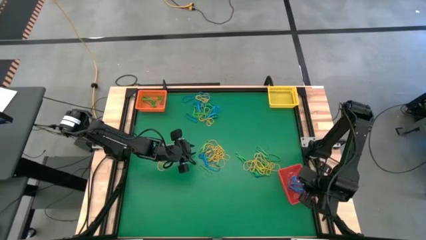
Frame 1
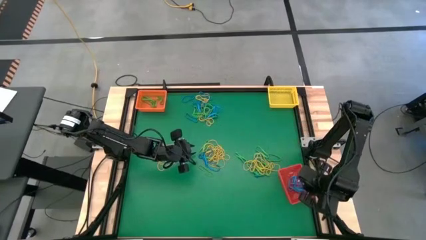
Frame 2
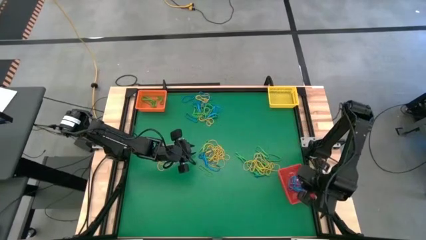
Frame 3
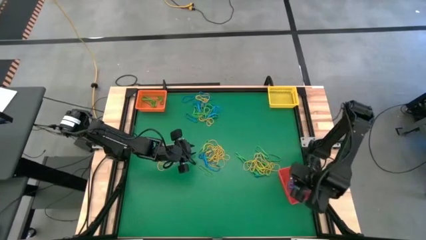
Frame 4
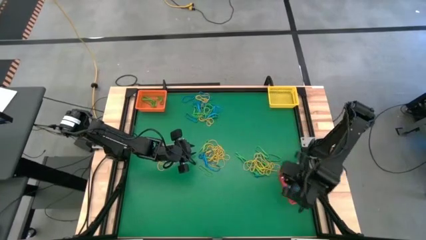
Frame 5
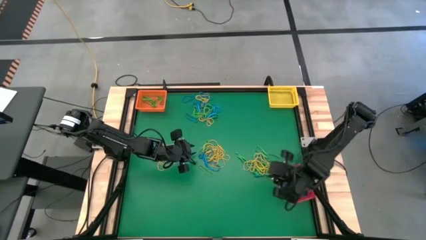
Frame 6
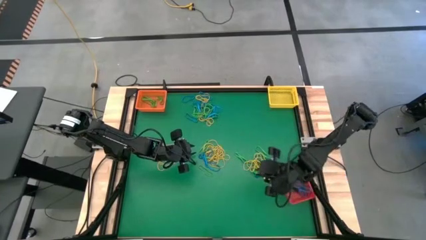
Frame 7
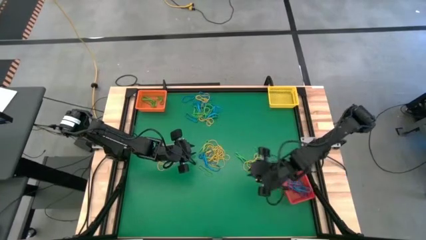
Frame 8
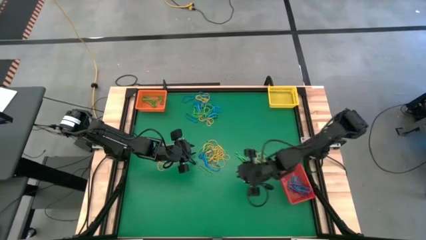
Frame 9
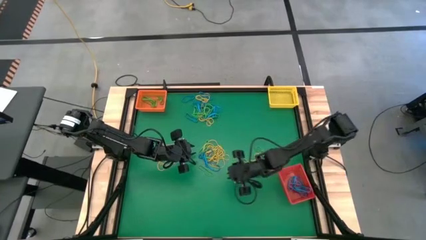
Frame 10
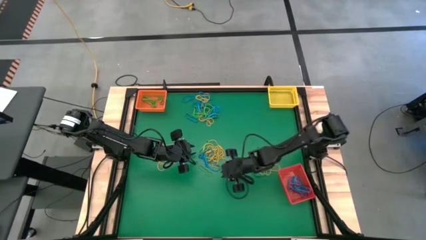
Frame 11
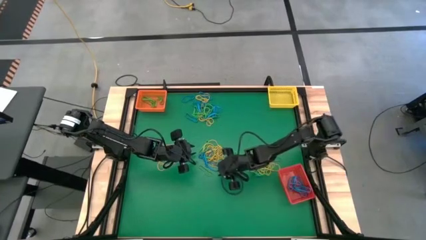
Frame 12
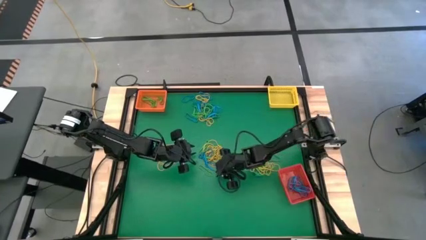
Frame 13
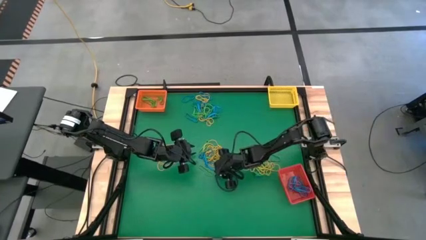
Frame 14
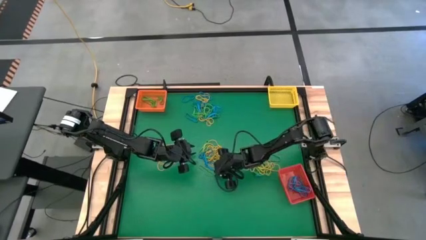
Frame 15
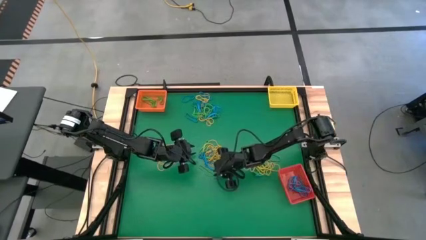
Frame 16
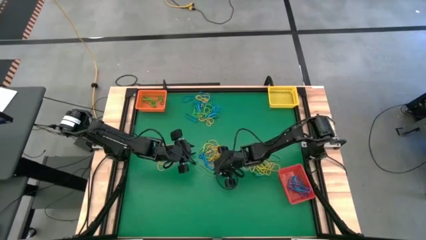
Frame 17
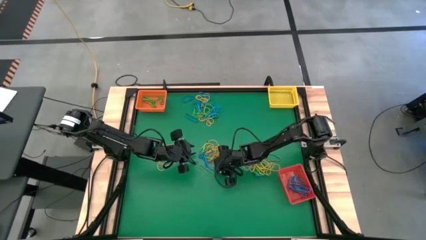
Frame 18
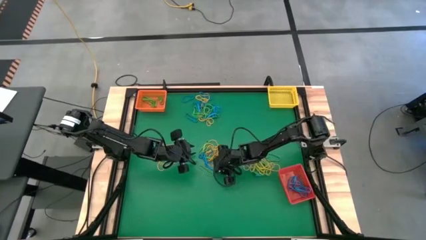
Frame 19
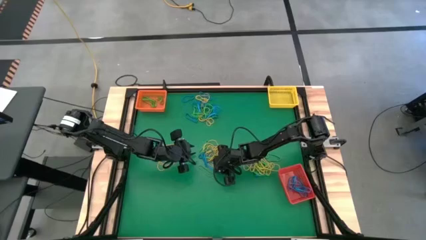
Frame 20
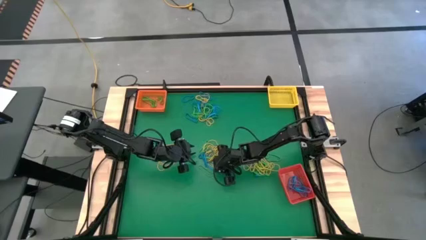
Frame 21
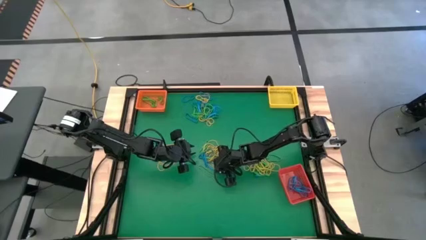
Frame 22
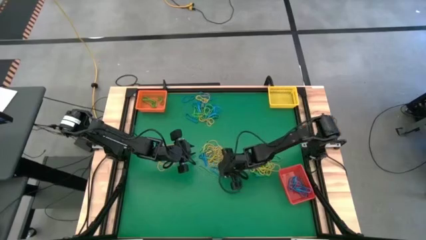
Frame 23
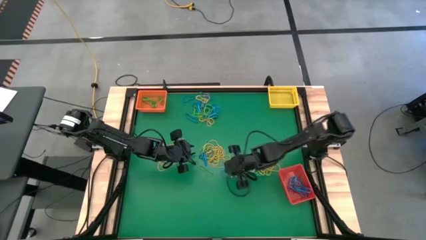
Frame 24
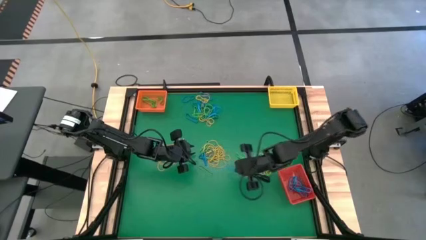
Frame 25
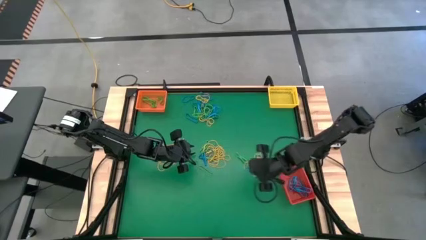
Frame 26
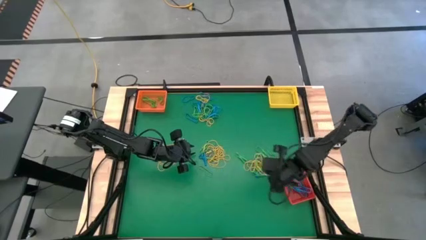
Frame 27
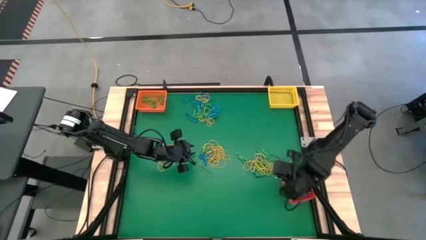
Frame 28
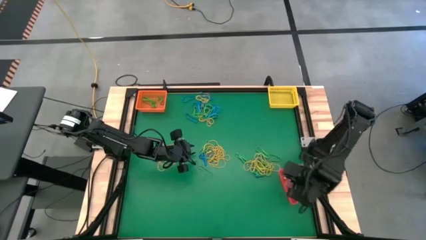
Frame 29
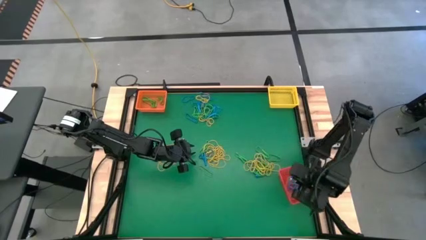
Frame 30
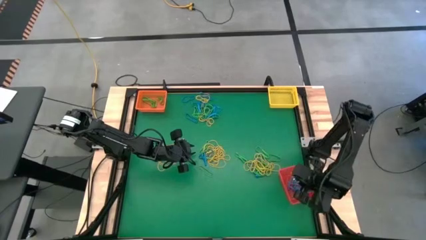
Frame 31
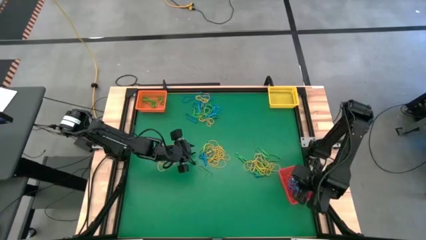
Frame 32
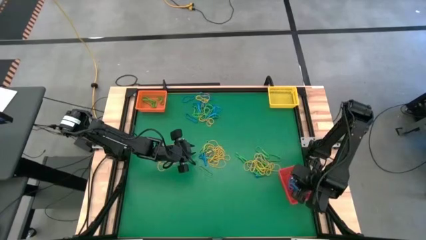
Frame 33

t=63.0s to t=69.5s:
Task: Sort rubber bands into baskets
Put the blue rubber band into the red bin

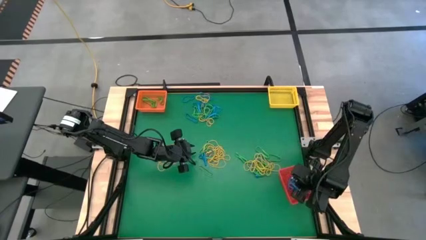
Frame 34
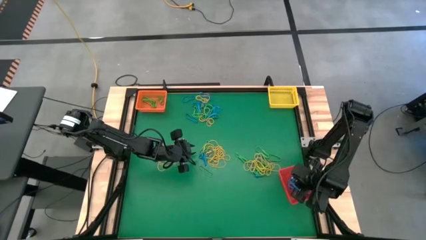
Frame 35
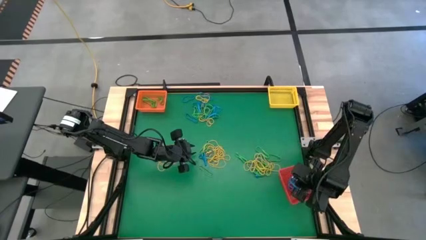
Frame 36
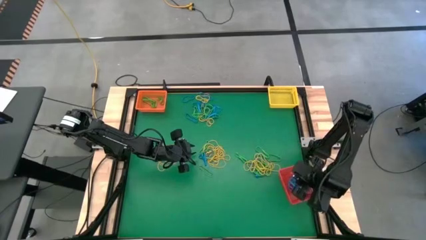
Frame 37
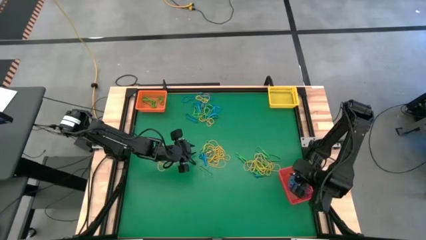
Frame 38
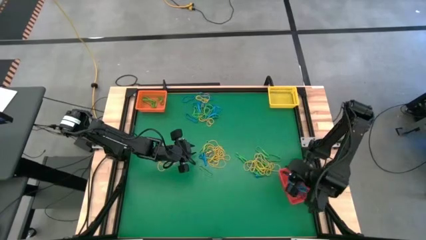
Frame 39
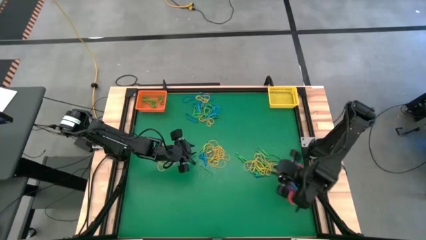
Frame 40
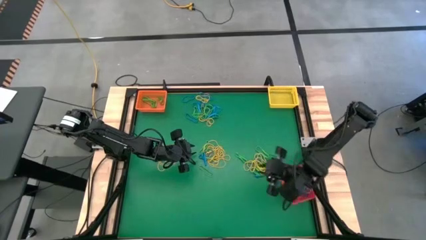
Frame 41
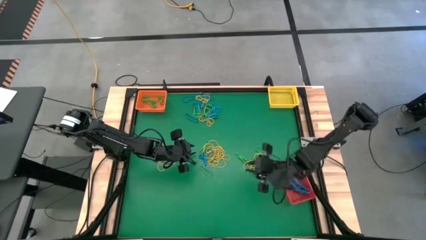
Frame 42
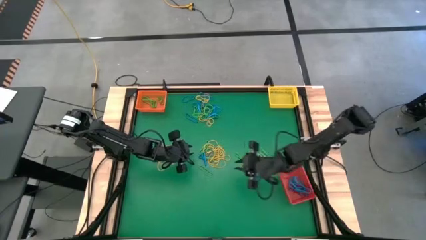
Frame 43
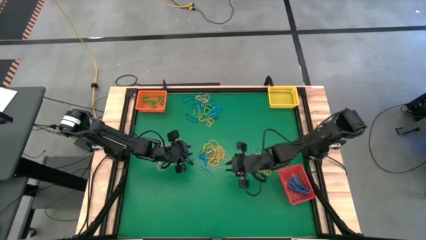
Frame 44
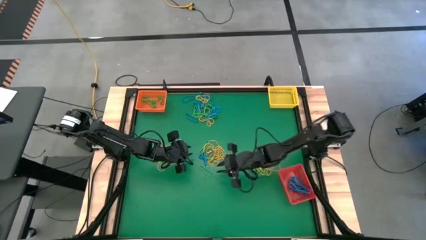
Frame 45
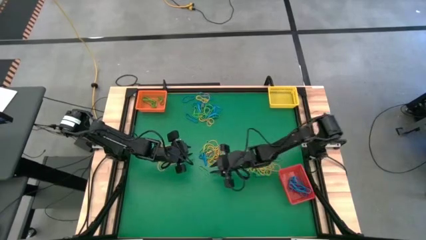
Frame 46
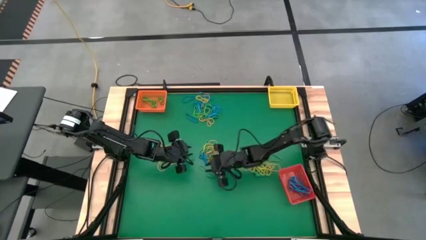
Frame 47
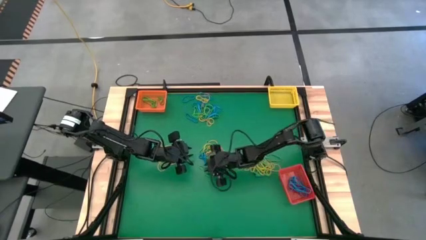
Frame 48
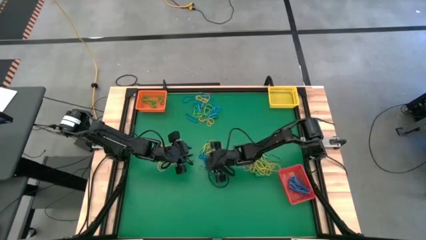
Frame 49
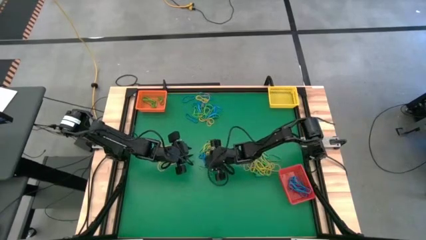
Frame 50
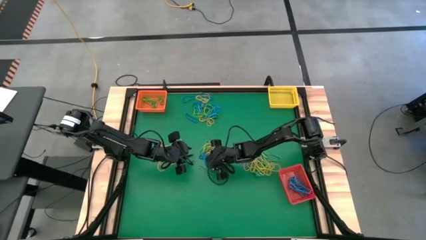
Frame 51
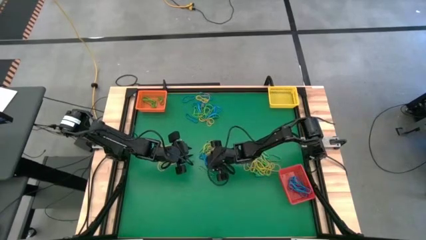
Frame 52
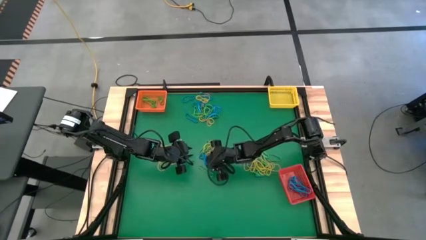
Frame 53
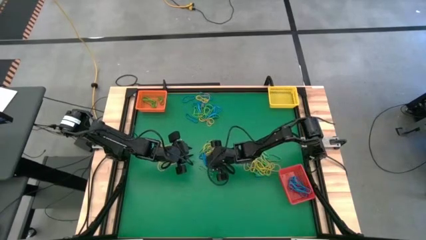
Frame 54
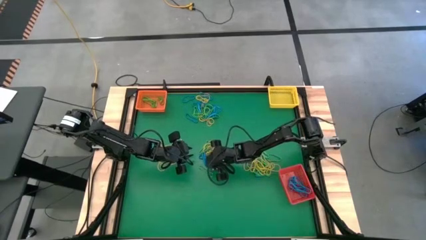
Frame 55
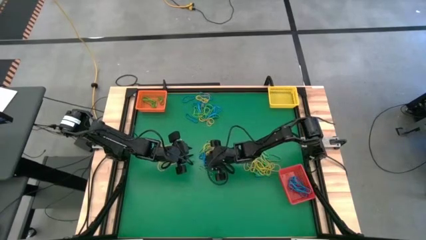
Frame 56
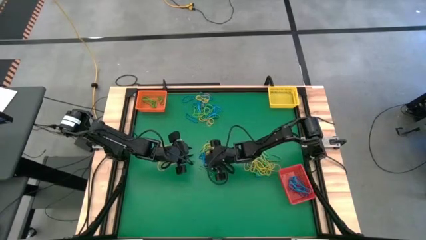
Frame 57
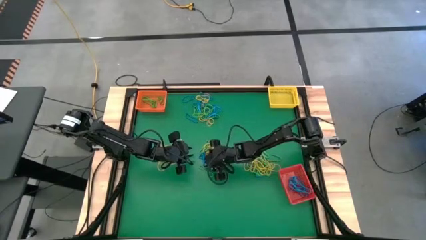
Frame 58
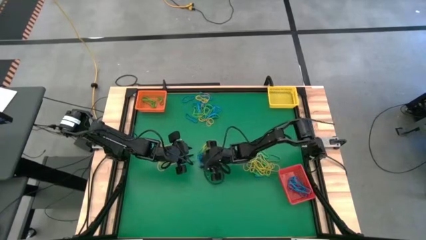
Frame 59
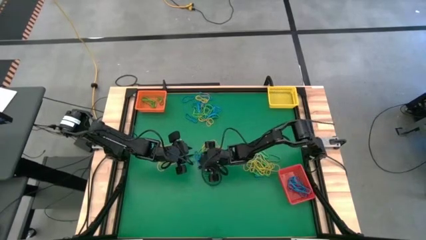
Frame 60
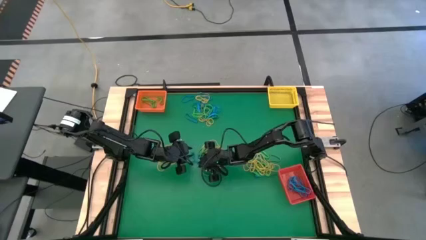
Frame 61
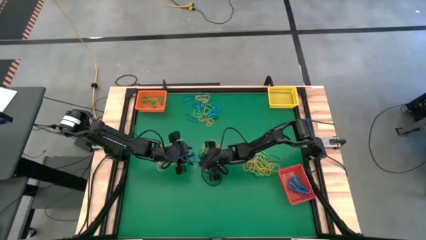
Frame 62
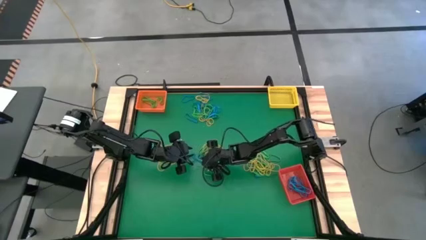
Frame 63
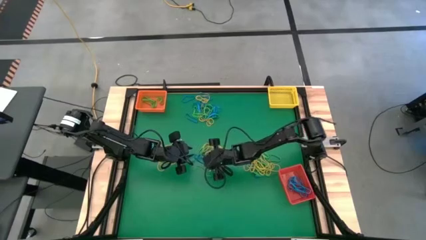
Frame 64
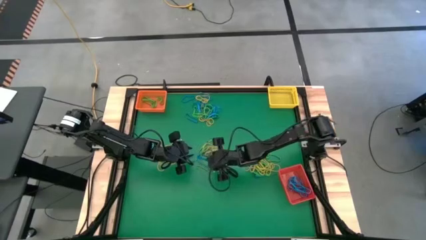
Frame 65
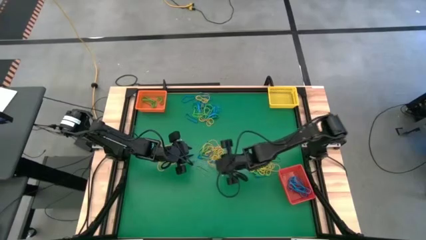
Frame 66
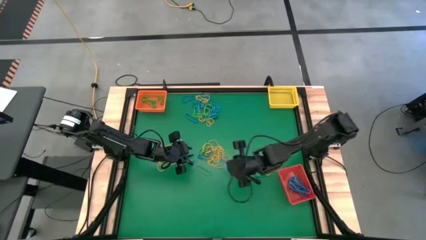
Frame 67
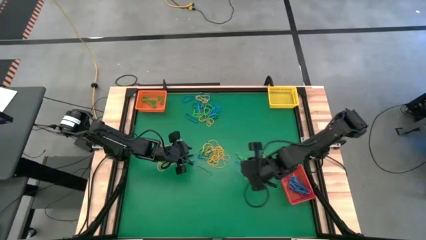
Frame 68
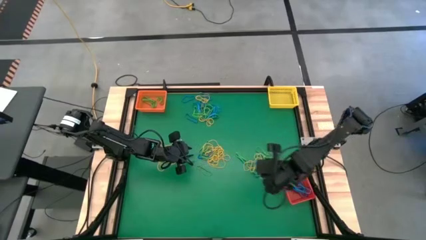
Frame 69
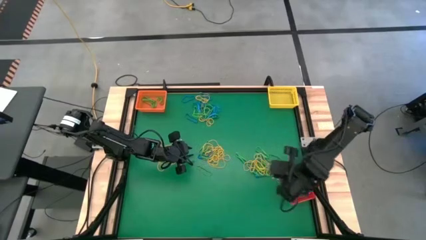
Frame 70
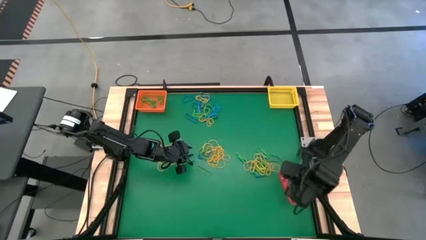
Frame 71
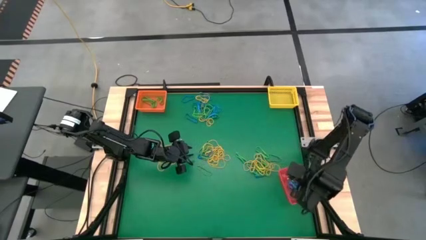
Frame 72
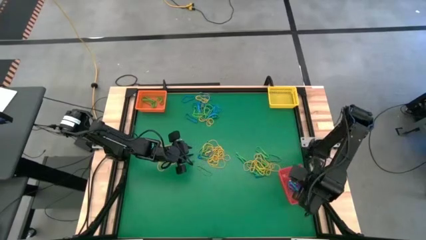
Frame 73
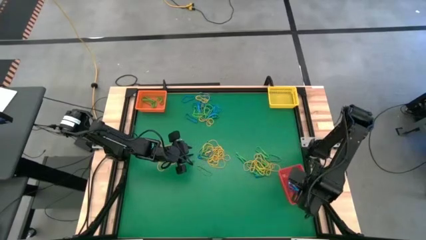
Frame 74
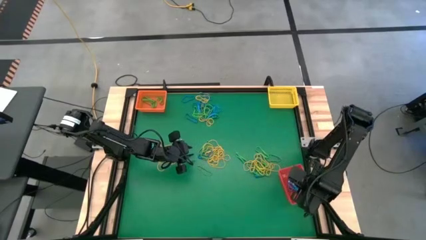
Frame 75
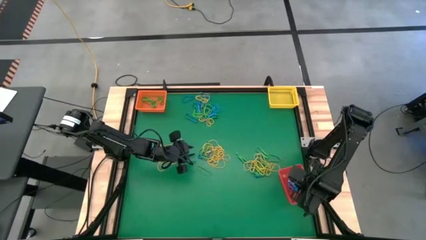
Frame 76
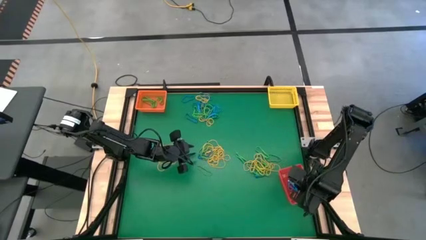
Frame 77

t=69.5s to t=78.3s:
Put the blue rubber band into the red bin

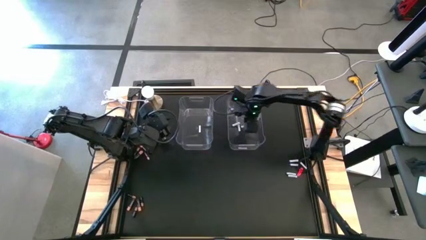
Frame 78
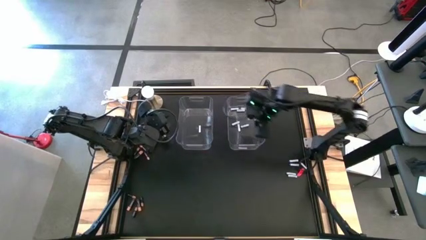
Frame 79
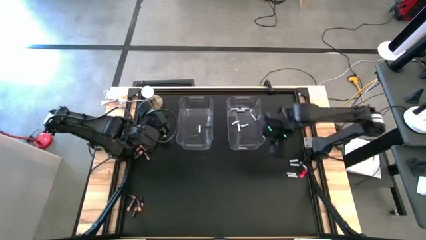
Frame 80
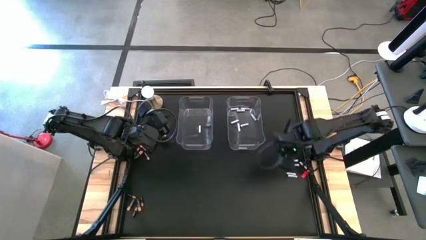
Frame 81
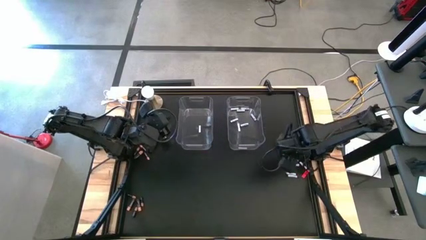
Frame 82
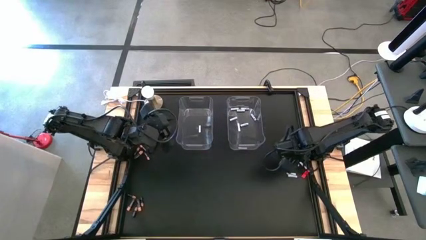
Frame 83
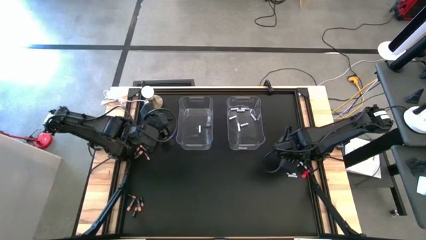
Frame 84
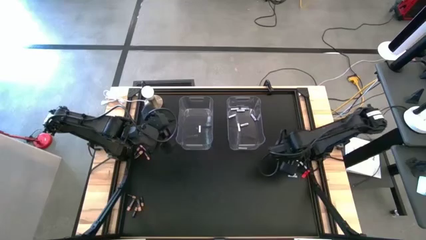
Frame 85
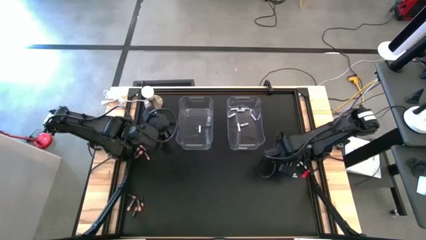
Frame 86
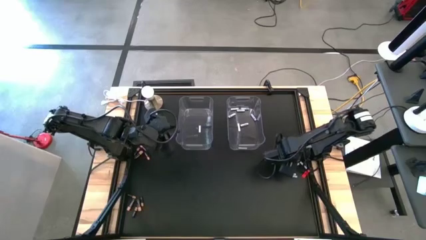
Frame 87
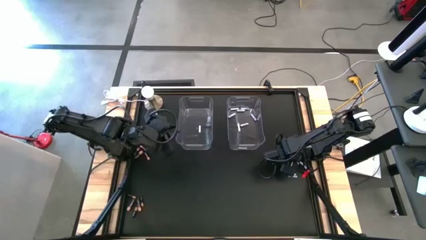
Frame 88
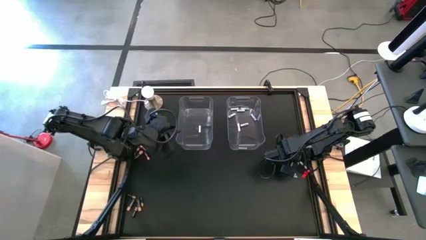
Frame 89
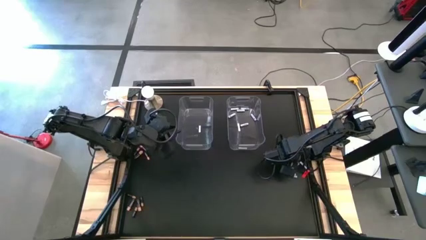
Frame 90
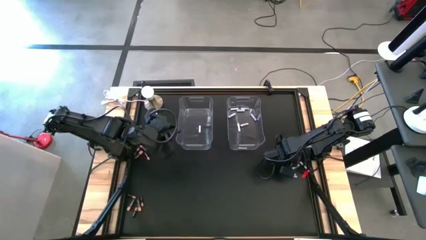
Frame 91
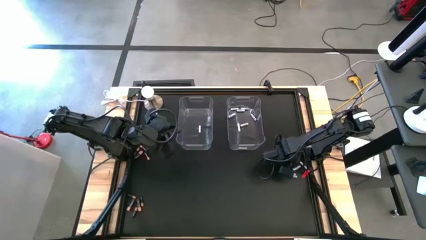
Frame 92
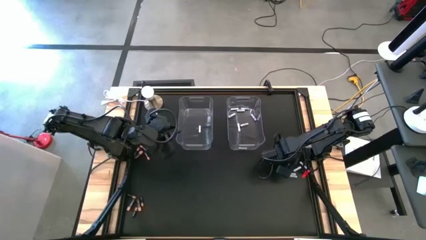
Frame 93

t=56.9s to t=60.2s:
Task: Sort batteries
Put the white battery into the right transparent bin
